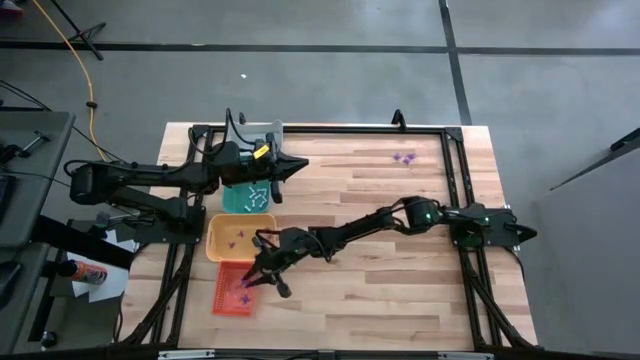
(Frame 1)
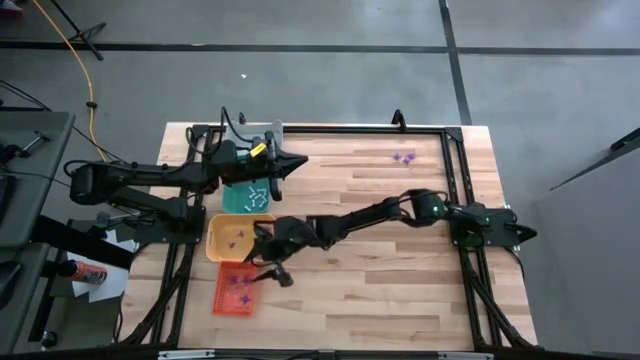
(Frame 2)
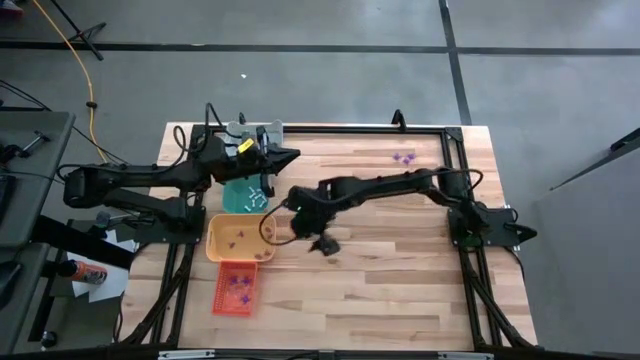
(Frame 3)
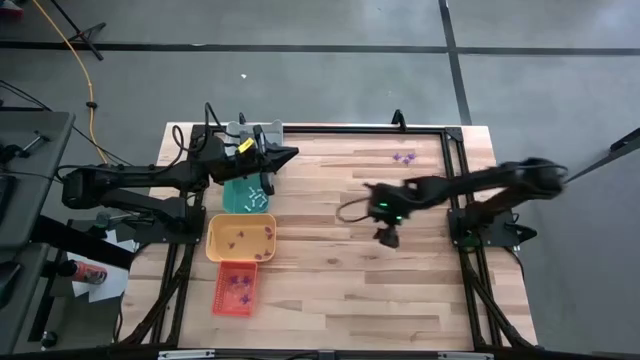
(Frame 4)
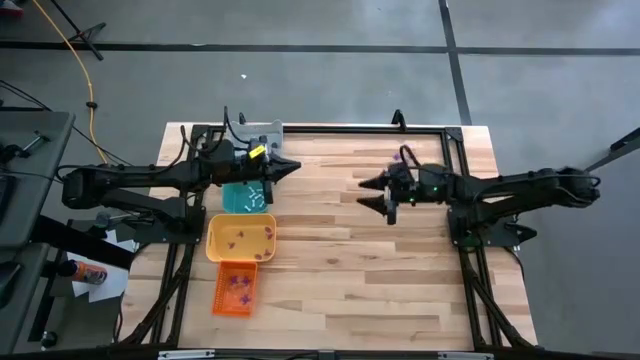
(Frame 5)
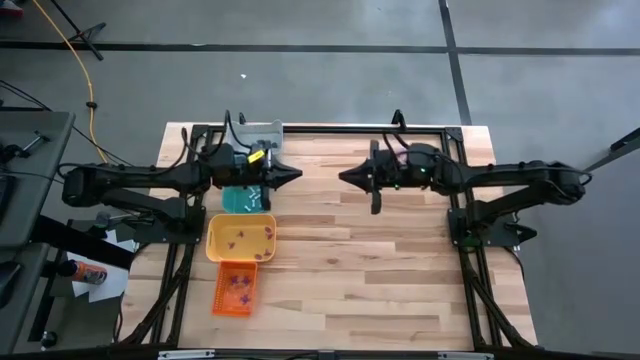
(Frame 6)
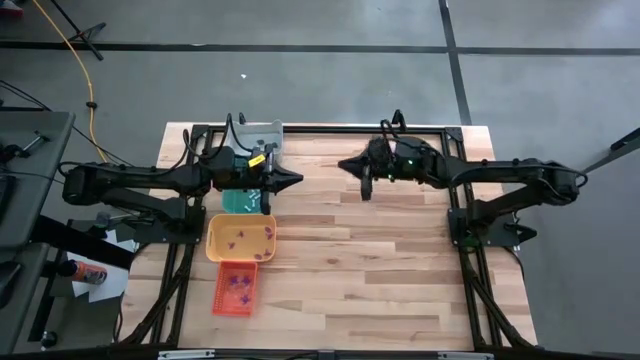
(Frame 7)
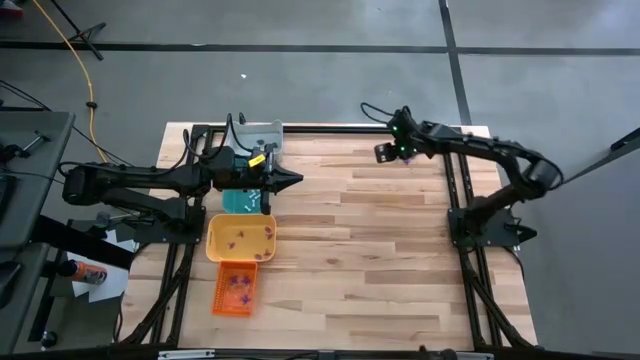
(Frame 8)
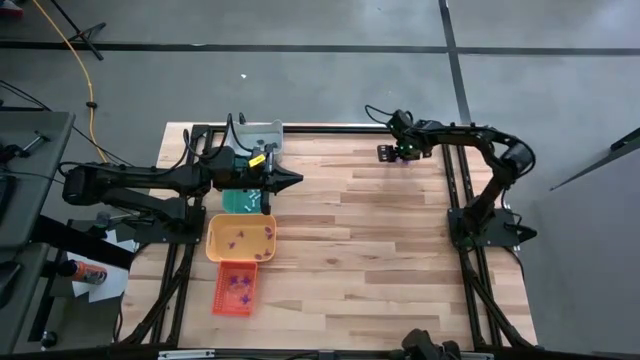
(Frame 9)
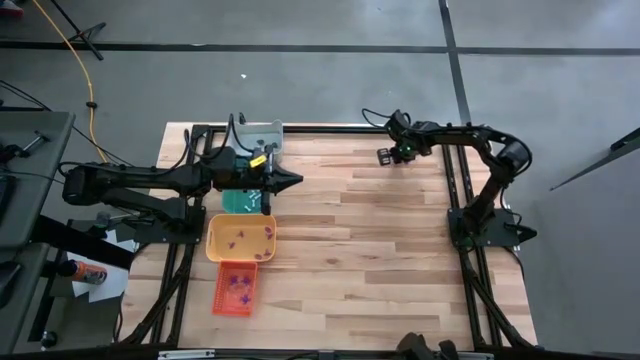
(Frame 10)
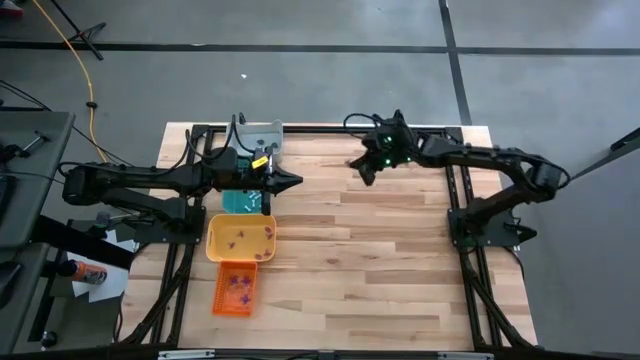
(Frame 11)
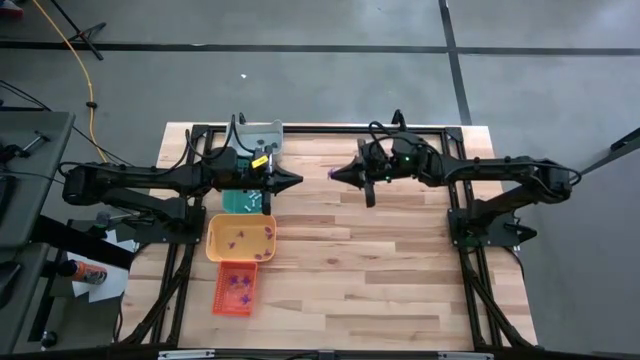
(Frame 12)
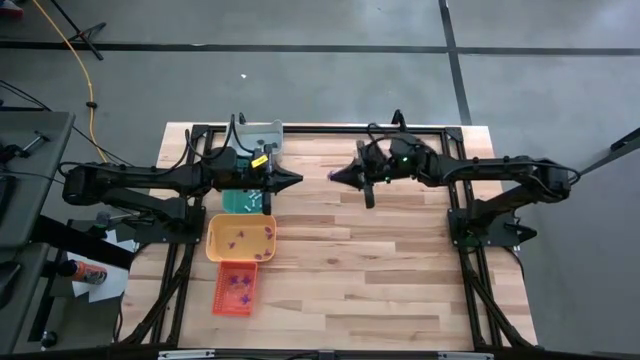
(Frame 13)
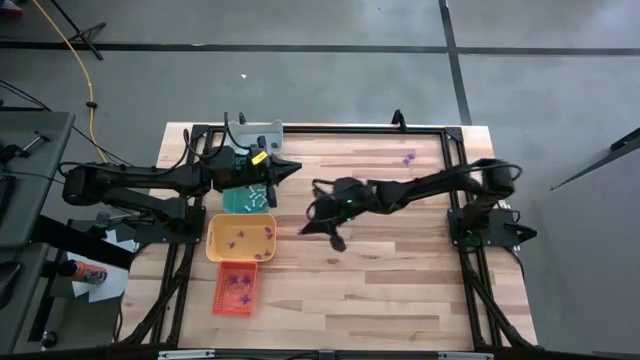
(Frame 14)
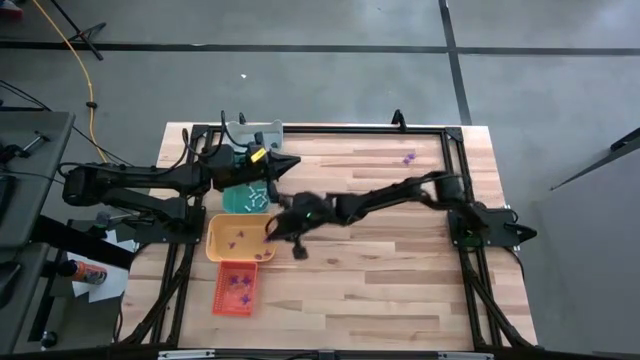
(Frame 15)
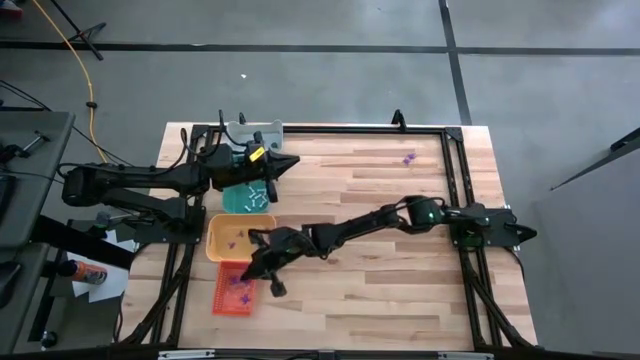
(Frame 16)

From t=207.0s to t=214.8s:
Task: Sort Halloween decoration
Put the purple spider toy in the orange bin

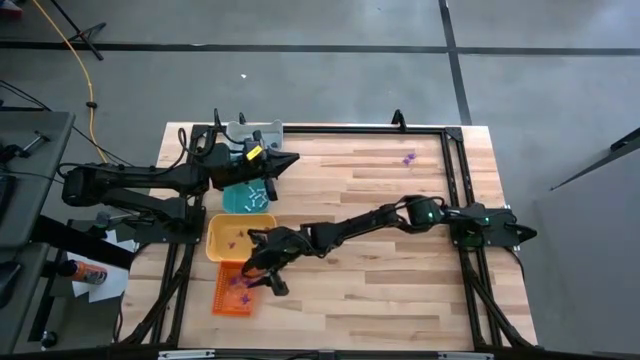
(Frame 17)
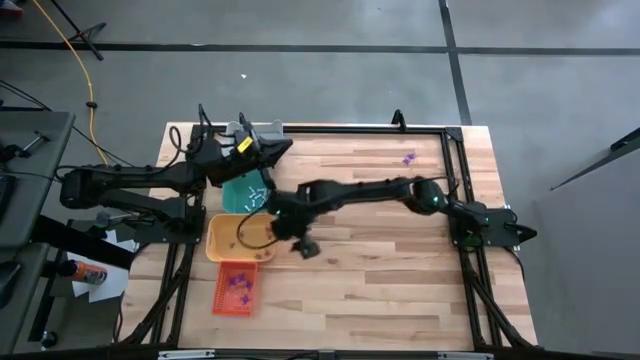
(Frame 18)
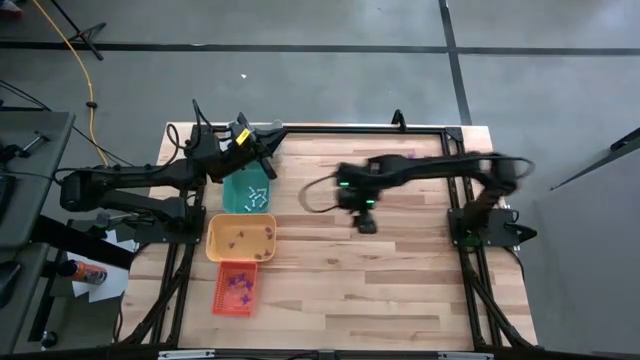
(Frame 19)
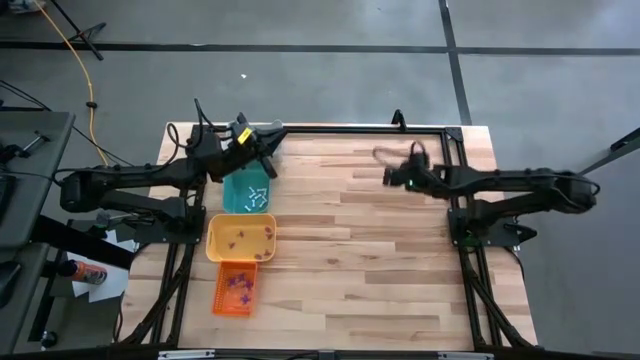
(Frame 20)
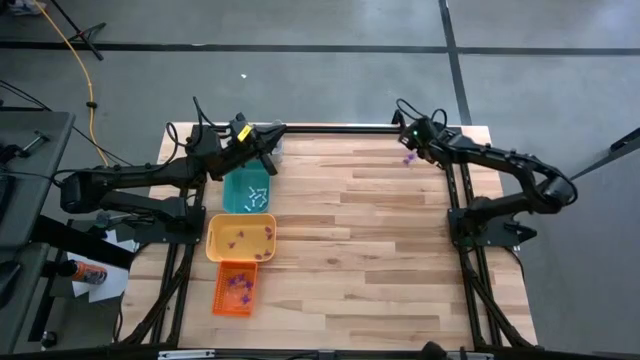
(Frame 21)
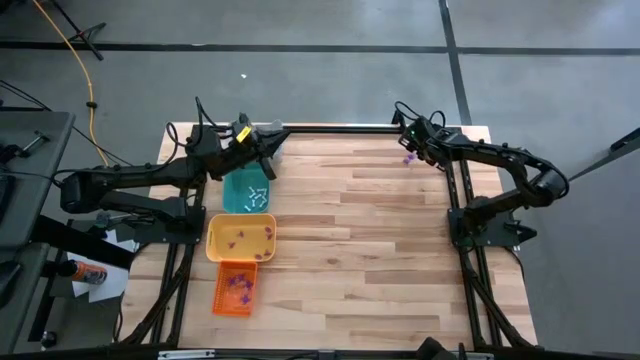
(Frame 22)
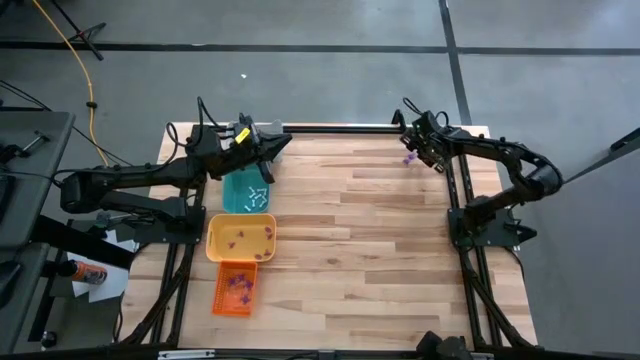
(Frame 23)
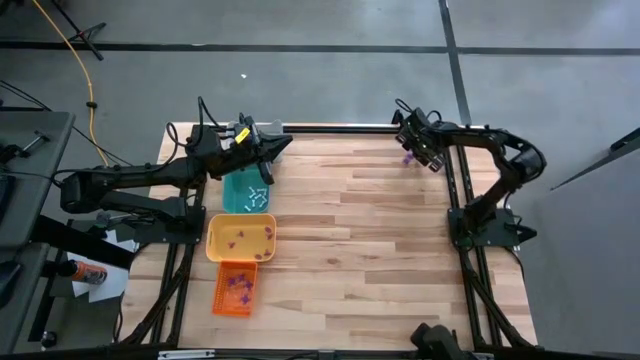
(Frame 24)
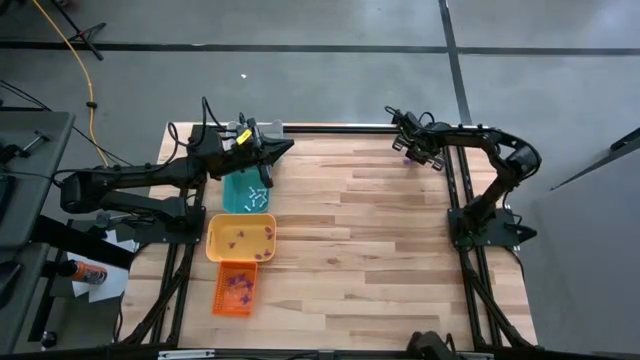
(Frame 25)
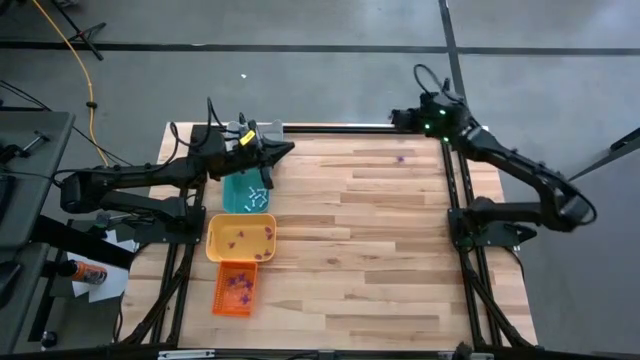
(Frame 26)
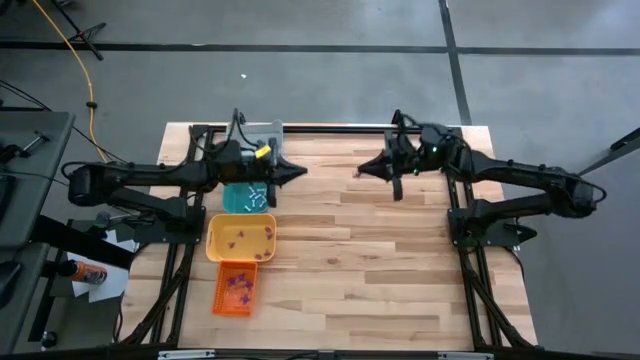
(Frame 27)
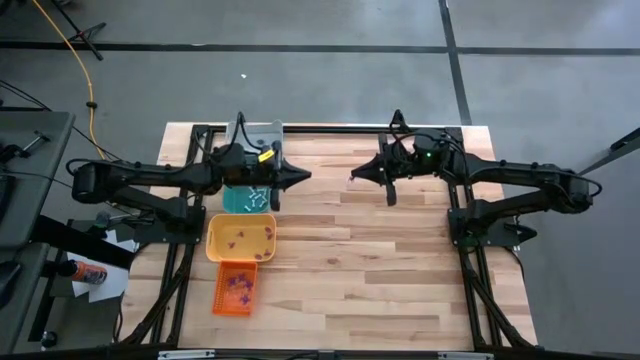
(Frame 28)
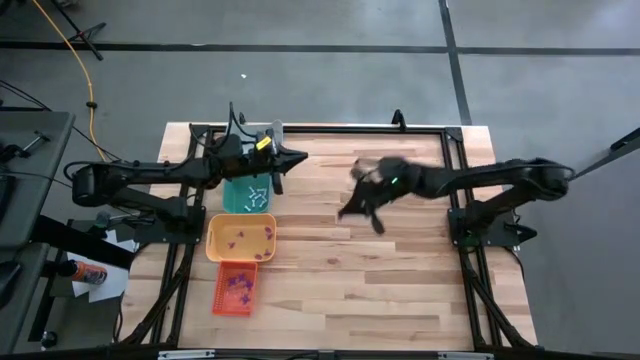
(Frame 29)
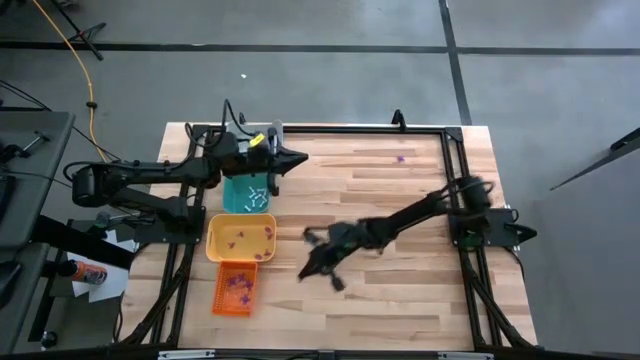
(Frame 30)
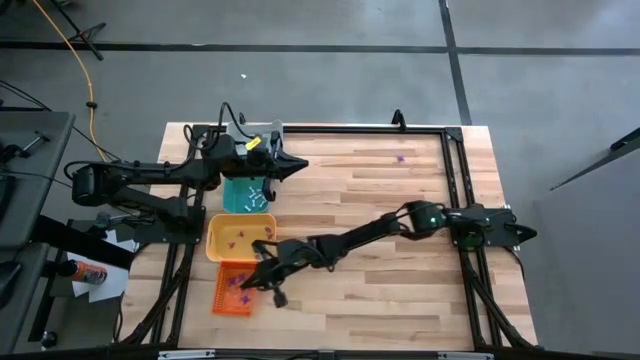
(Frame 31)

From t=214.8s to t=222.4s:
Put the purple spider toy in the orange bin

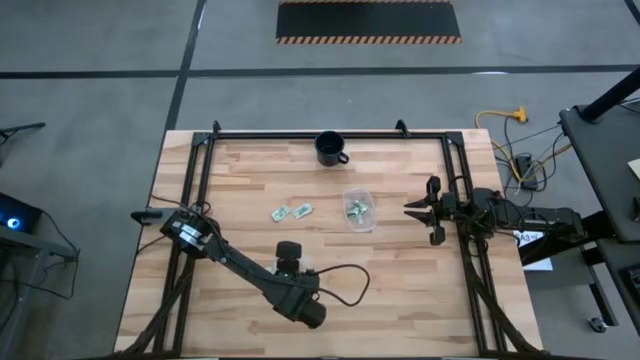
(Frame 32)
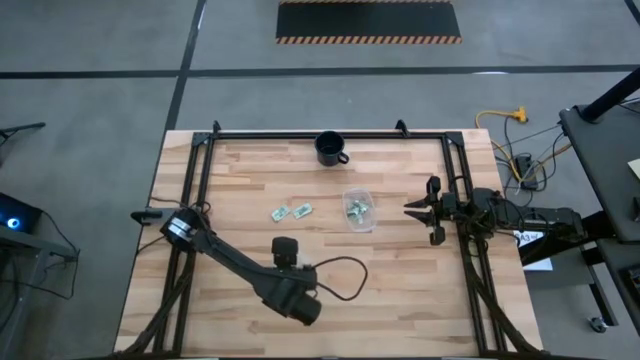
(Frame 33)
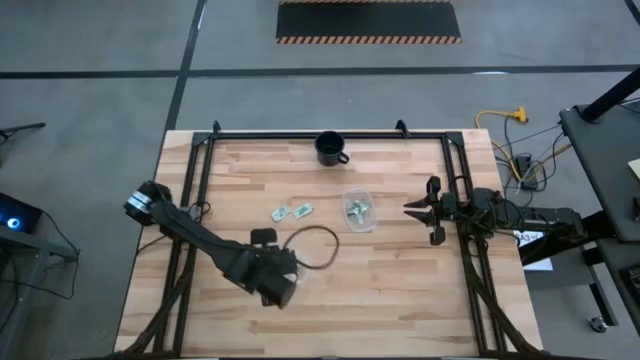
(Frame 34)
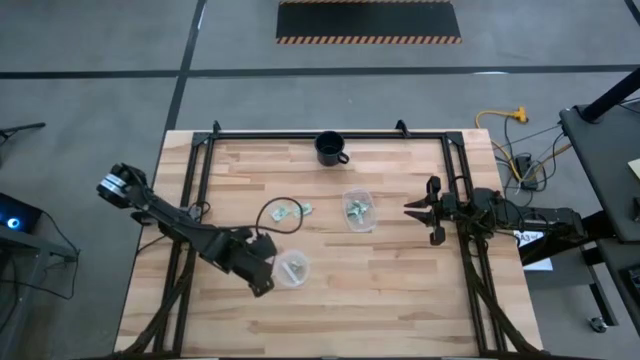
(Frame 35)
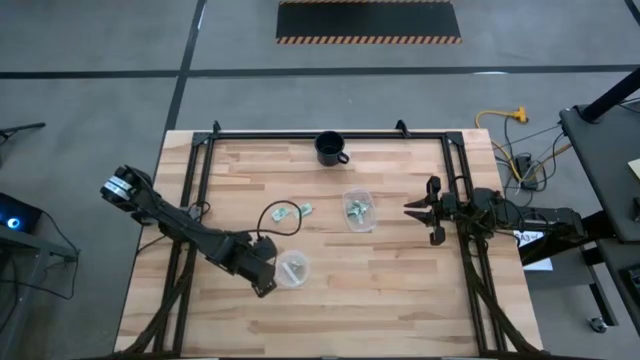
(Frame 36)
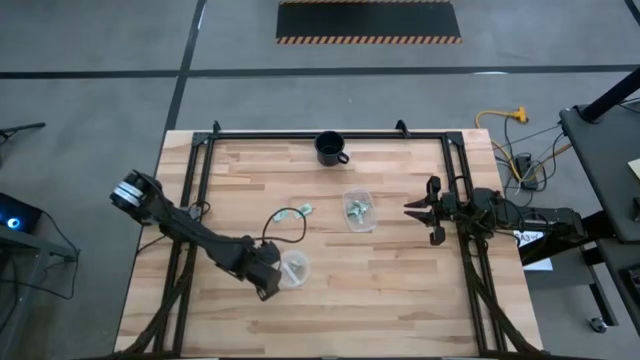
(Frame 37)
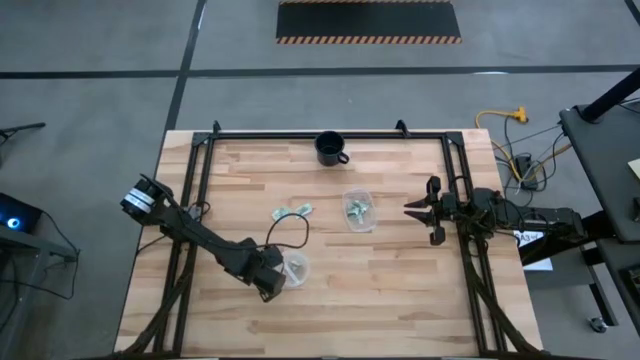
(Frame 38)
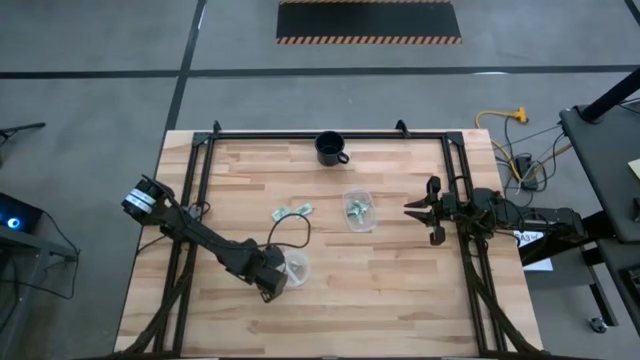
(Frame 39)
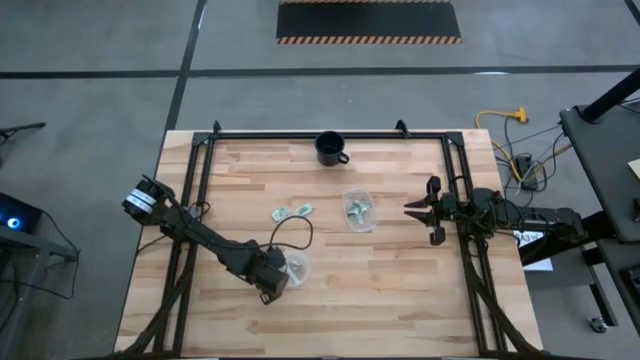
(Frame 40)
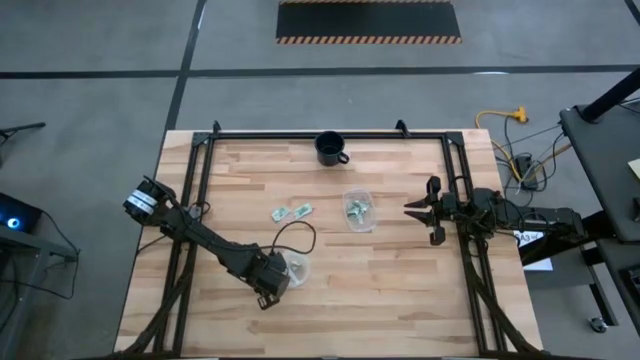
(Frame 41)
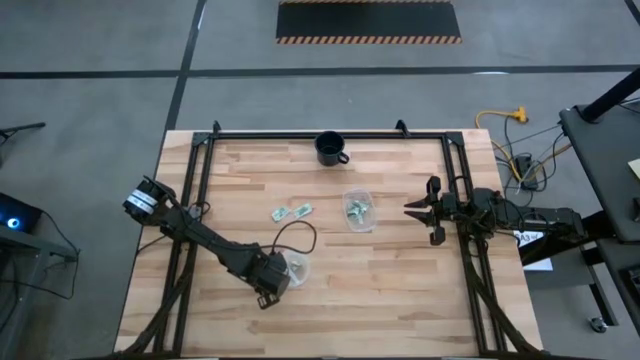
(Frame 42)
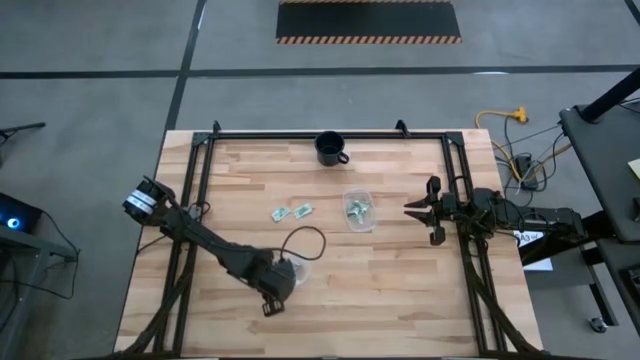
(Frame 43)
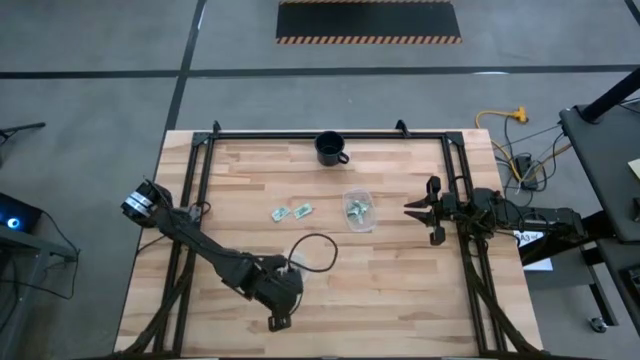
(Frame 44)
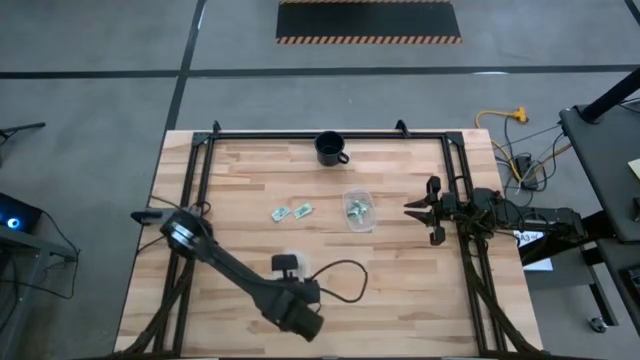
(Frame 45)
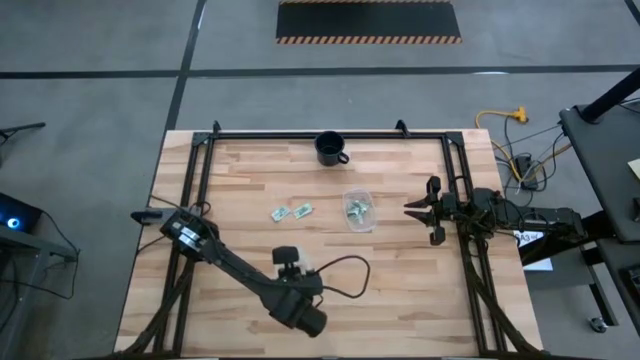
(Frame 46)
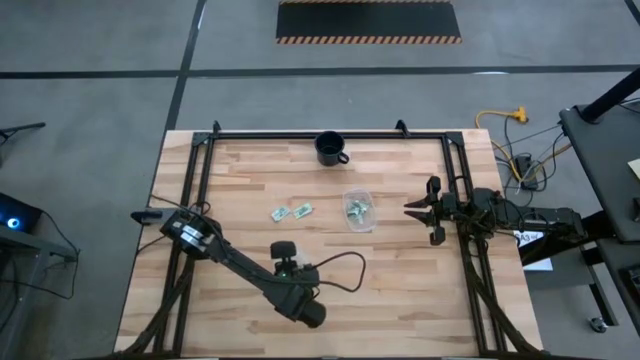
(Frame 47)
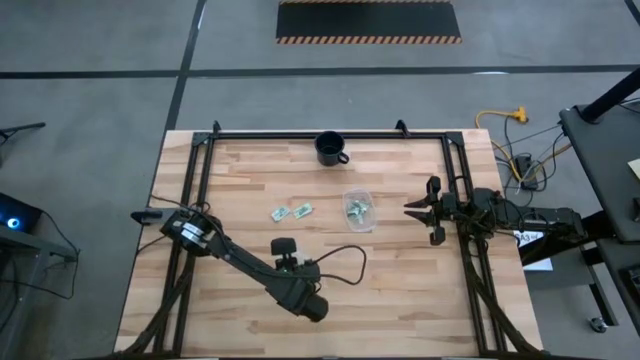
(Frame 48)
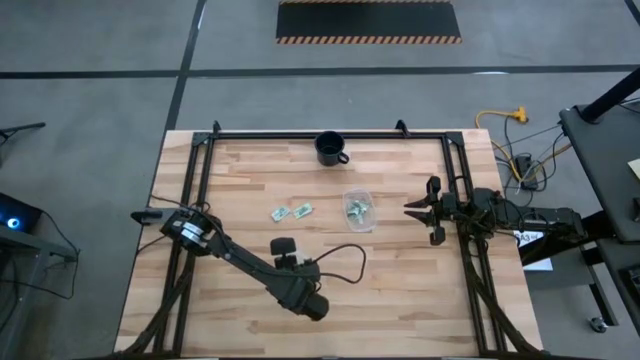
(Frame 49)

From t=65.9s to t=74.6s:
Task: Pick and place items into bin
Put the white stevia packet into the left transparent bin
